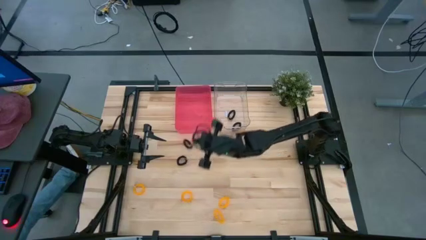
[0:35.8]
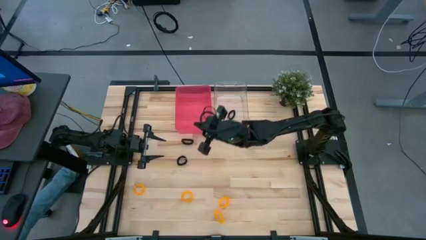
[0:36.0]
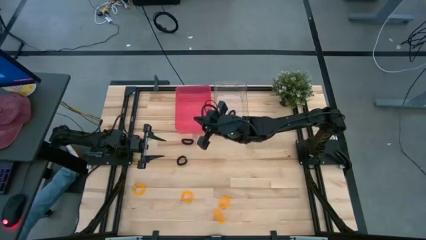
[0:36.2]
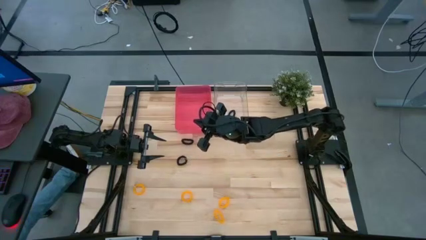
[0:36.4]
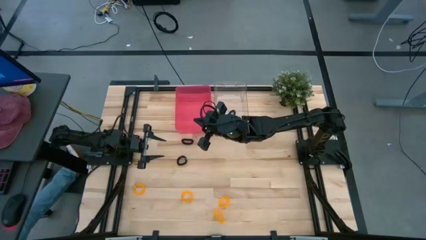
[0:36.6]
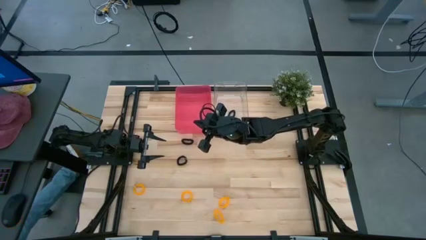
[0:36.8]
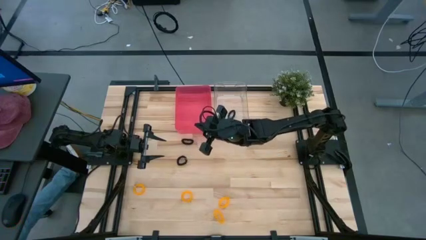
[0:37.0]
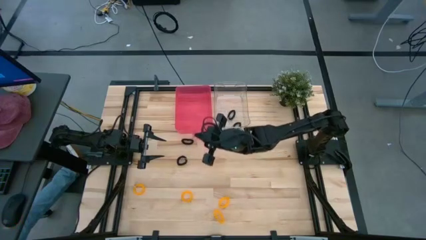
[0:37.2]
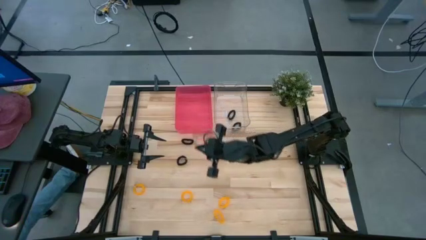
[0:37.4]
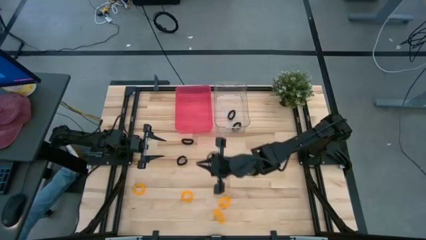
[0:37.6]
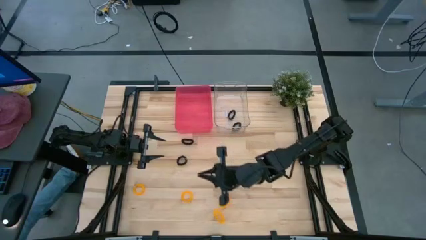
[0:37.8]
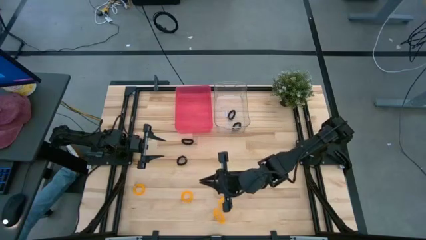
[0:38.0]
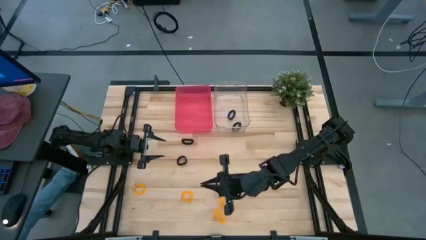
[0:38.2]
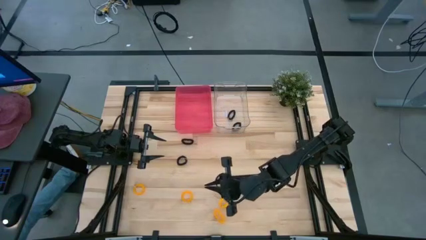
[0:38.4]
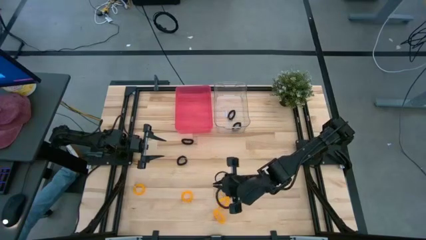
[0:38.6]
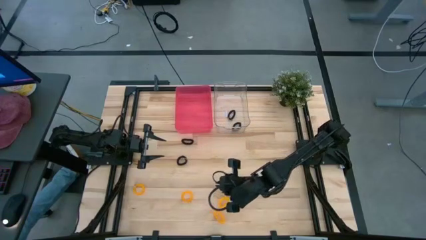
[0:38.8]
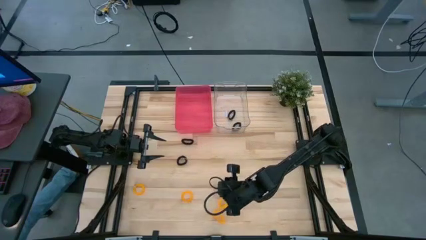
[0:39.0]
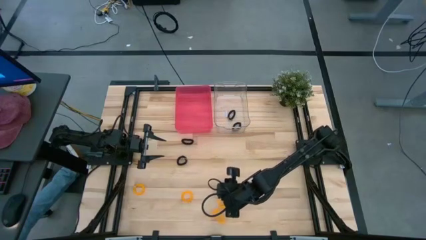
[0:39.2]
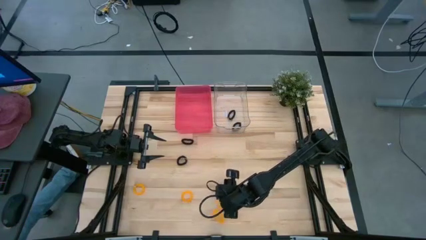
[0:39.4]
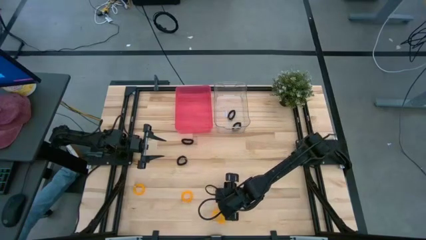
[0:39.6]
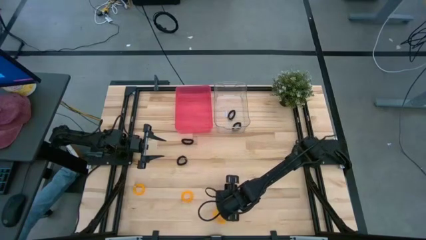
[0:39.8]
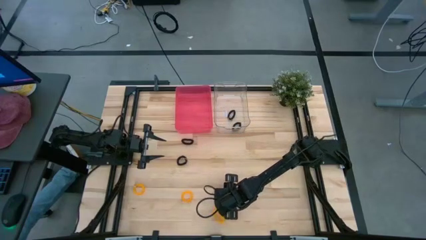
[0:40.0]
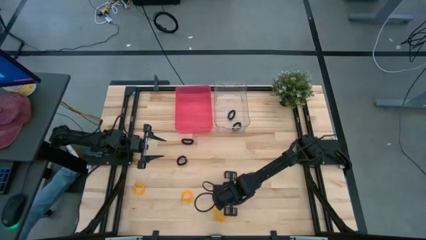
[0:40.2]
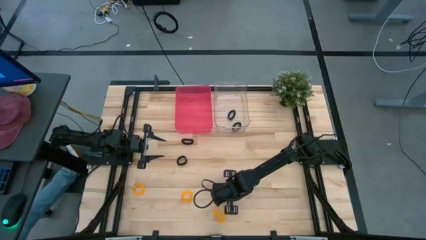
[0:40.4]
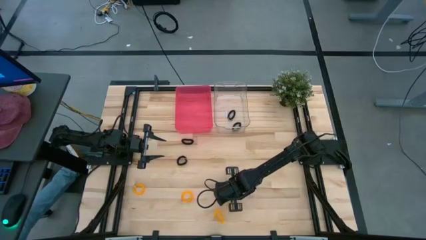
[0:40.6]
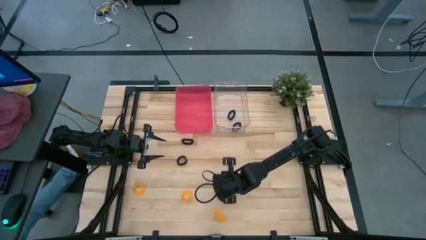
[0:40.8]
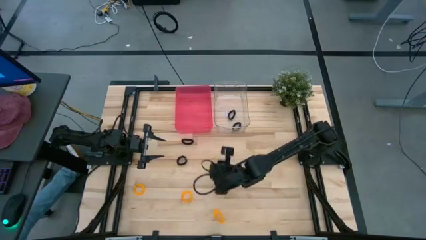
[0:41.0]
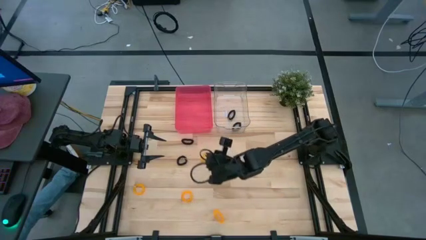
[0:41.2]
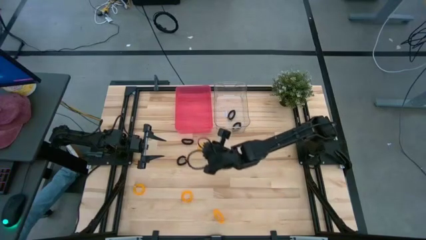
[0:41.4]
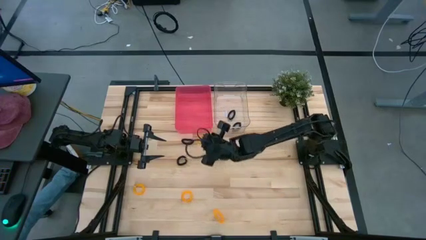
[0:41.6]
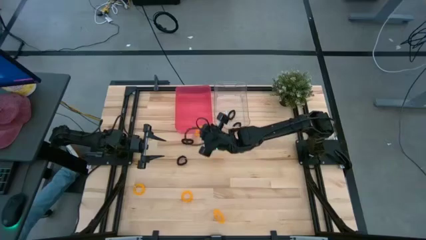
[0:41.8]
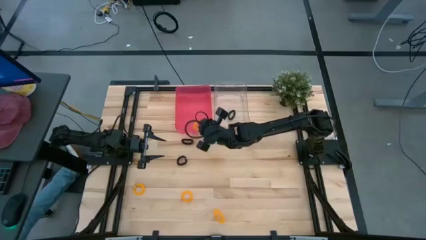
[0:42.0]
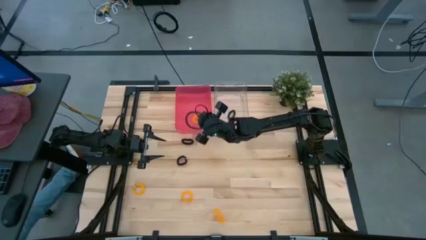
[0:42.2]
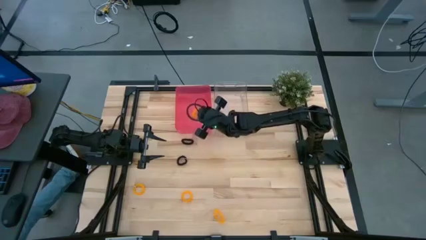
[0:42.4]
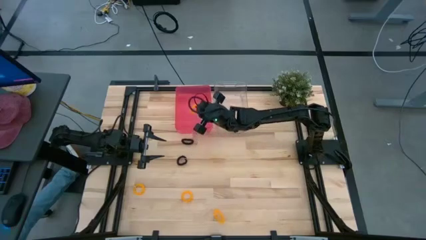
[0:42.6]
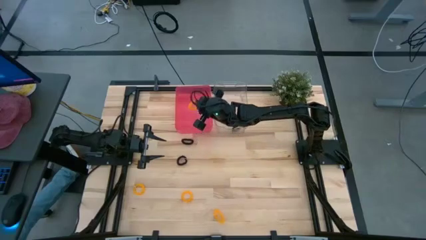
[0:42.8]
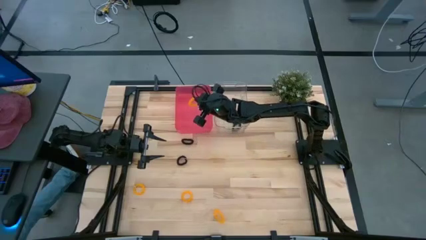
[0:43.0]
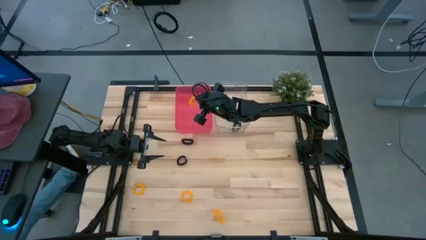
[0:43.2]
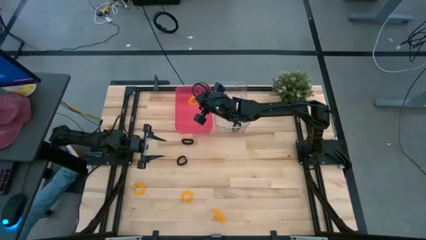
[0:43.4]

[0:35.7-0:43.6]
Task: Sort spring keychains
Put the yellow spring keychain into the red bin

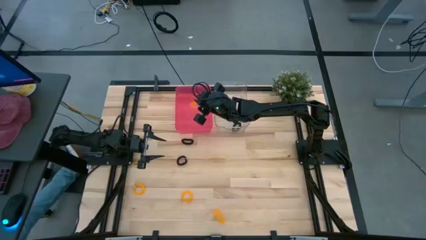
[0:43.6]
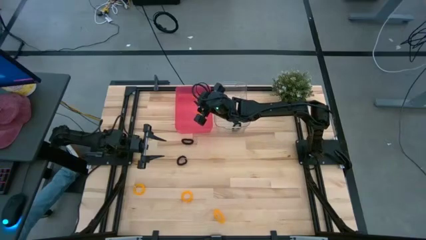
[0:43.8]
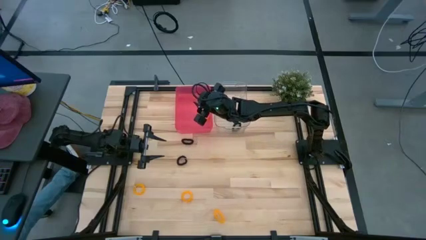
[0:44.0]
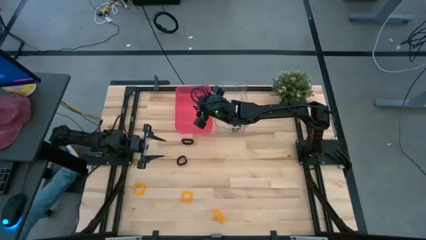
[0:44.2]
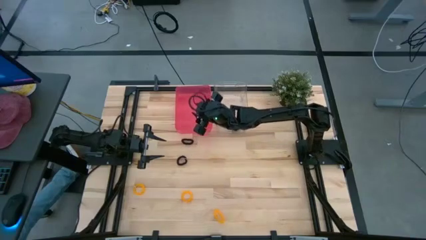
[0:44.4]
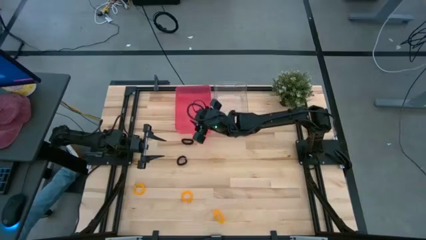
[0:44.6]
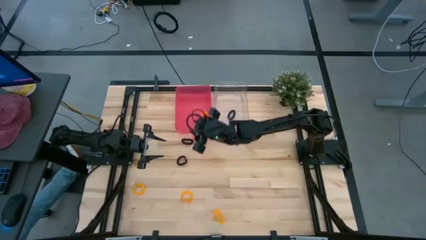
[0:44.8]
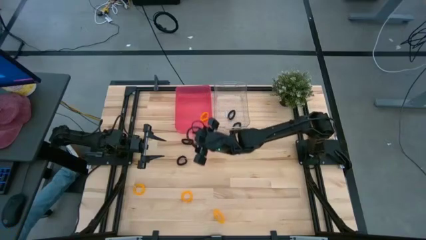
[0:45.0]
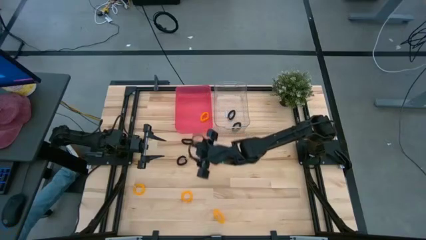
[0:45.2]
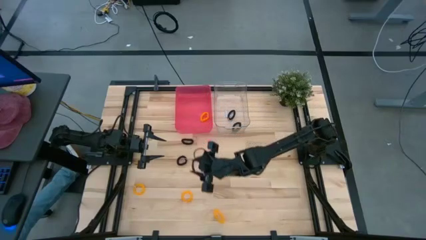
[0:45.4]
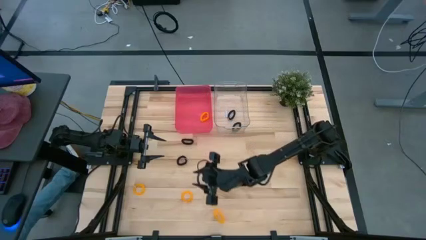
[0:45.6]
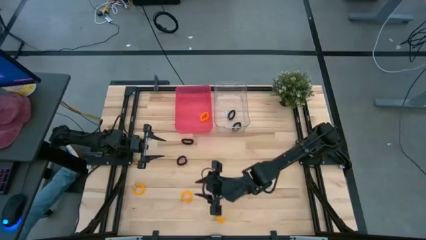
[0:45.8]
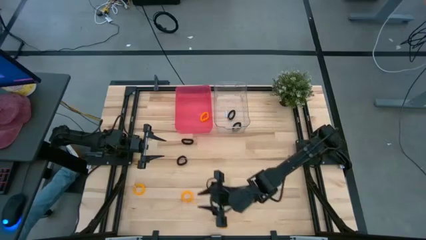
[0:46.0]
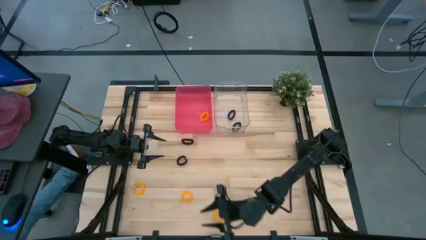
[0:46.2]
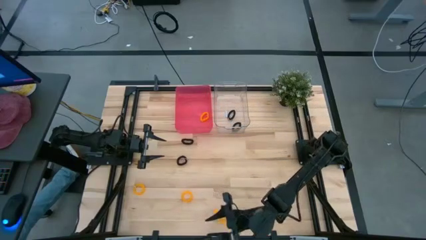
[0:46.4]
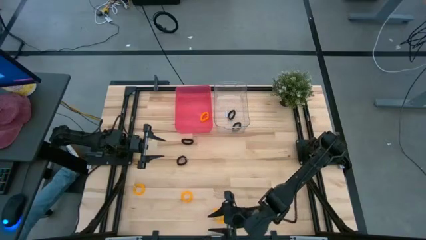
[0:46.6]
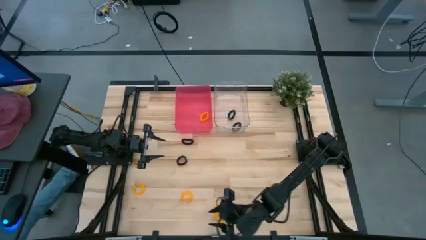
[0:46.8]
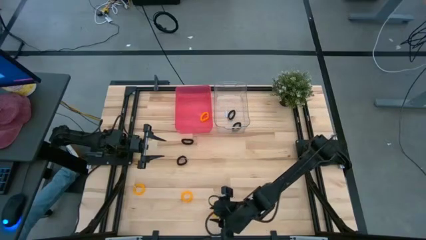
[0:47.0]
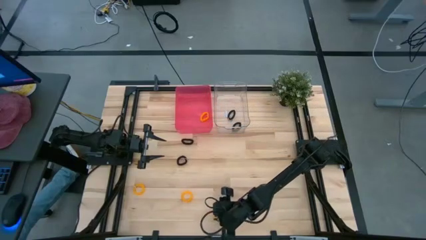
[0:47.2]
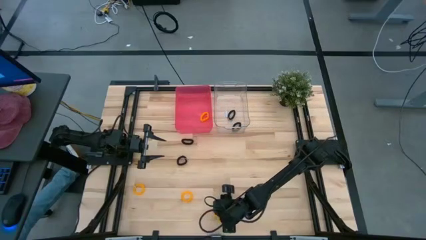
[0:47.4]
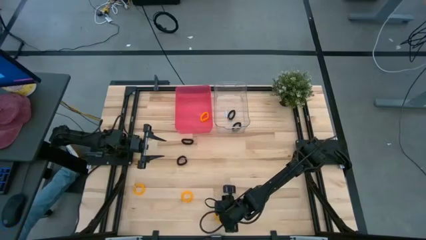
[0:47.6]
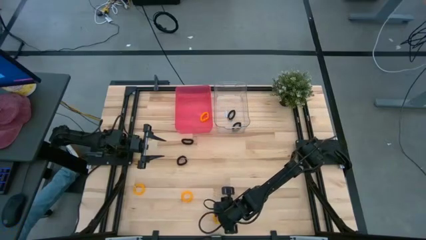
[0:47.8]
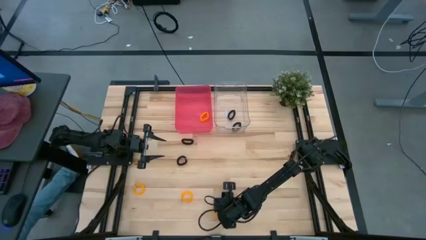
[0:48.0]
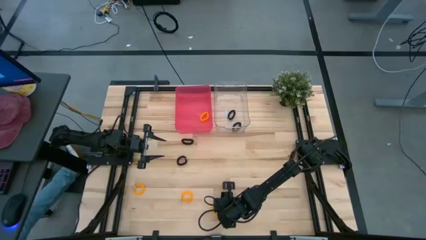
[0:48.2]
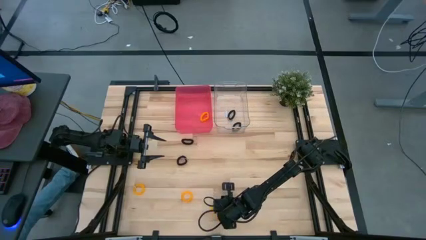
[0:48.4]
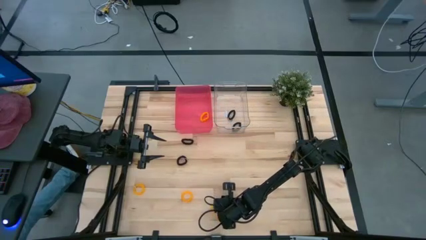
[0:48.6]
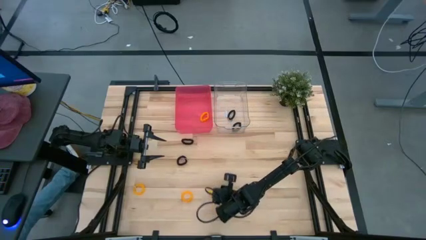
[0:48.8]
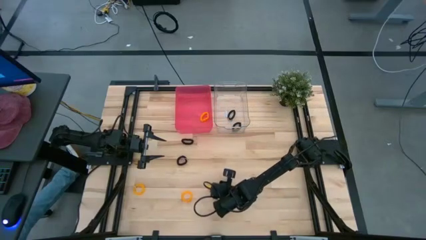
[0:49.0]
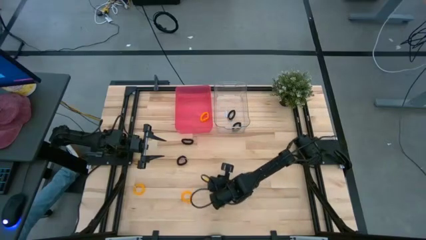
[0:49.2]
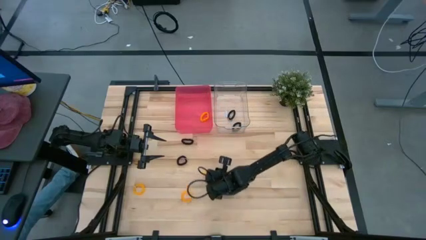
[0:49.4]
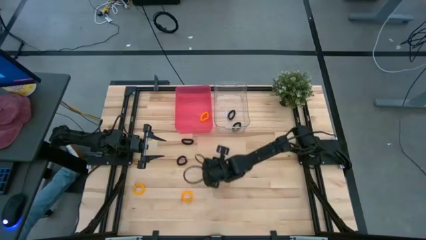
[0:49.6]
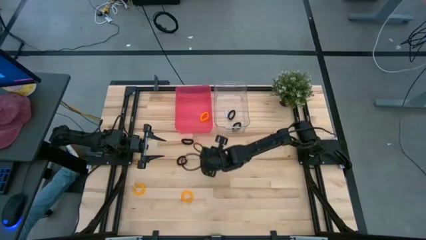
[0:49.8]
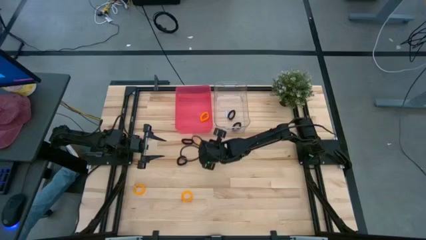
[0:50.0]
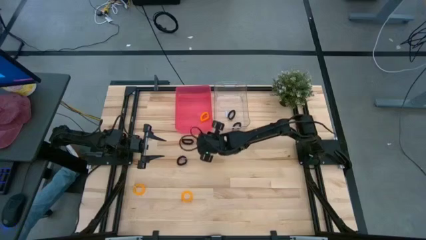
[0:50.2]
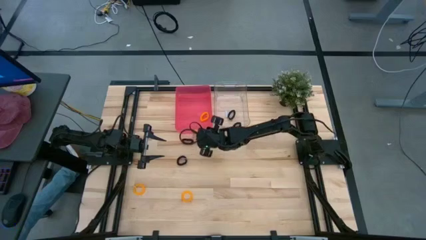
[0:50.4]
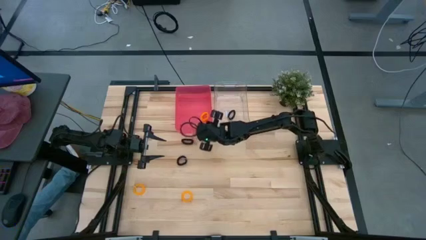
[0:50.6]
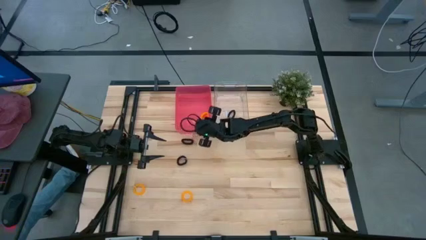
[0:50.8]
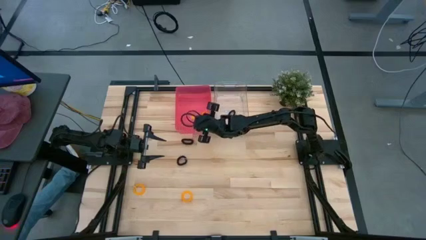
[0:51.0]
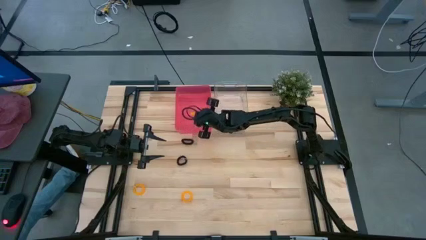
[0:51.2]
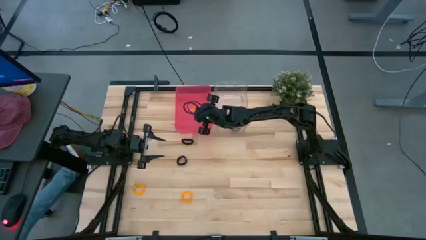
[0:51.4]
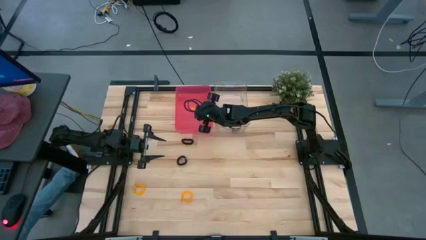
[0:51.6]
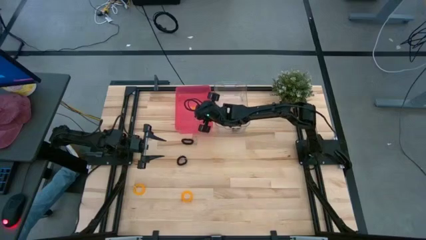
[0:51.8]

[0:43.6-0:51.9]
Put the yellow spring keychain into the red bin
